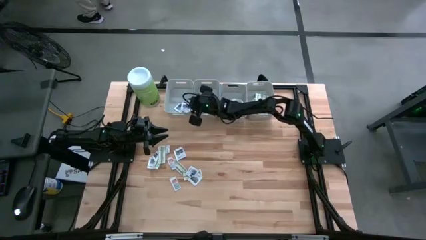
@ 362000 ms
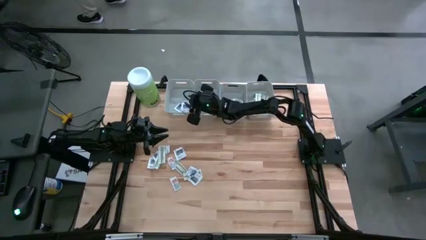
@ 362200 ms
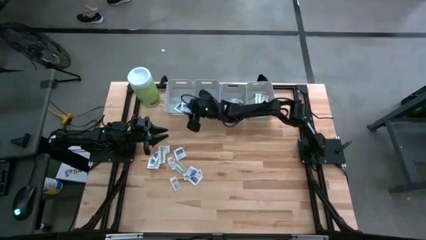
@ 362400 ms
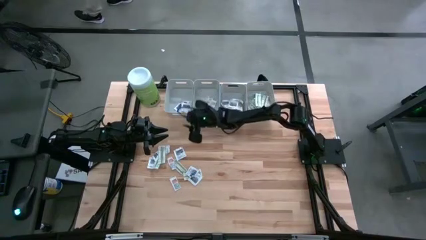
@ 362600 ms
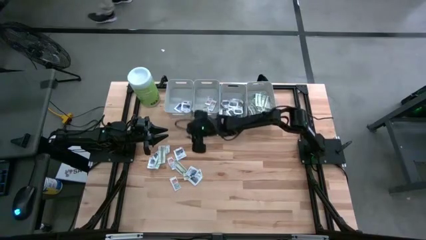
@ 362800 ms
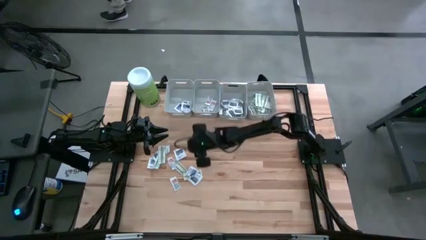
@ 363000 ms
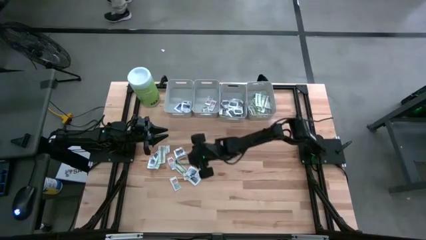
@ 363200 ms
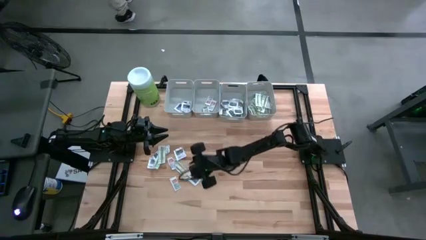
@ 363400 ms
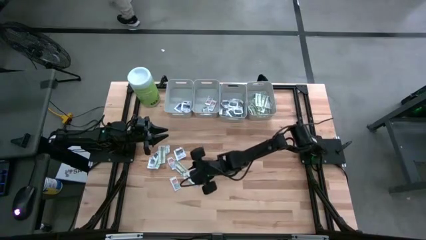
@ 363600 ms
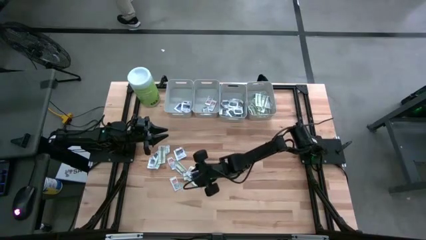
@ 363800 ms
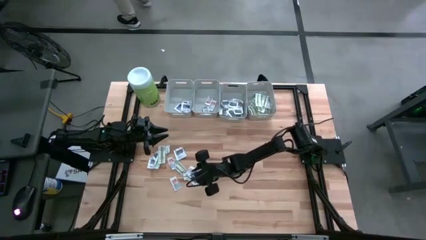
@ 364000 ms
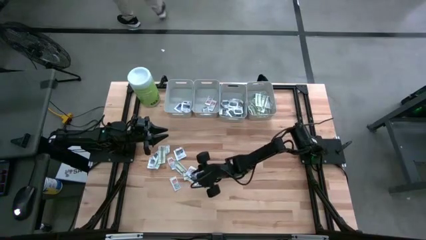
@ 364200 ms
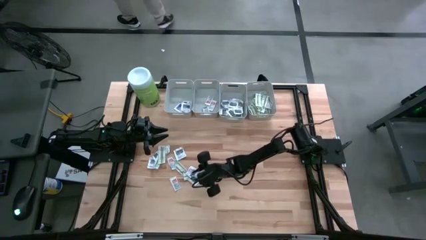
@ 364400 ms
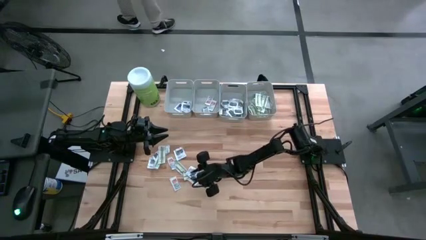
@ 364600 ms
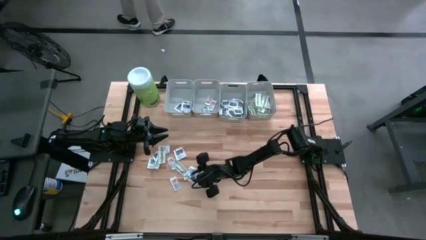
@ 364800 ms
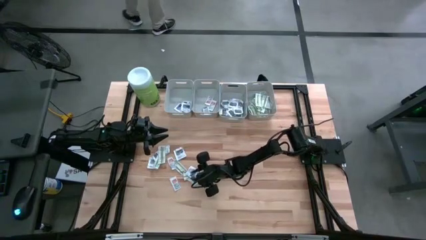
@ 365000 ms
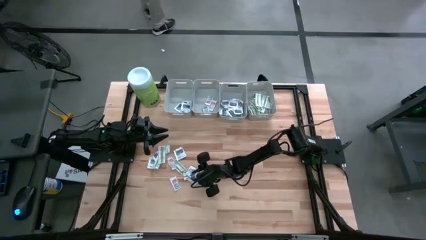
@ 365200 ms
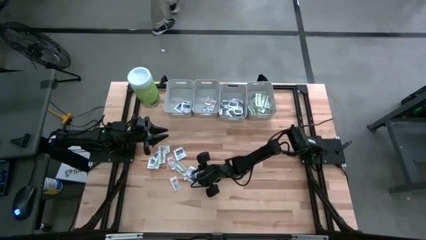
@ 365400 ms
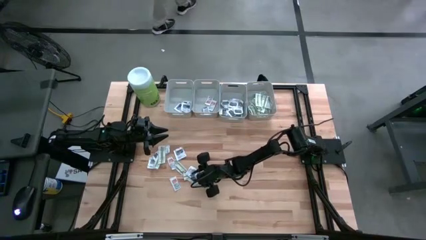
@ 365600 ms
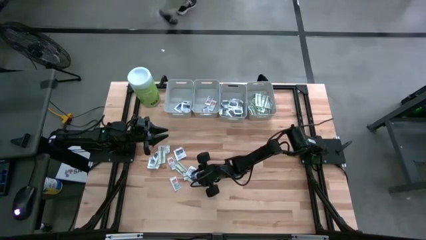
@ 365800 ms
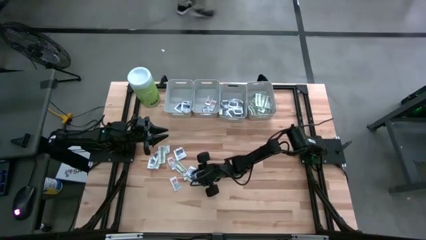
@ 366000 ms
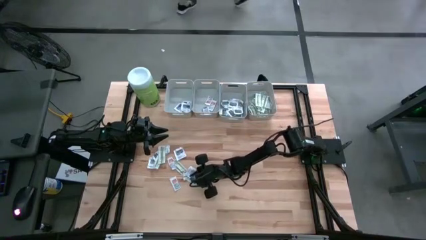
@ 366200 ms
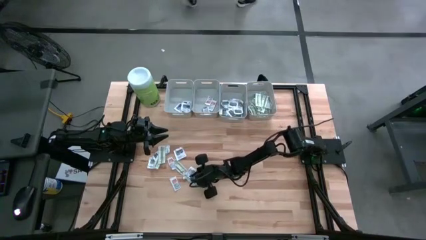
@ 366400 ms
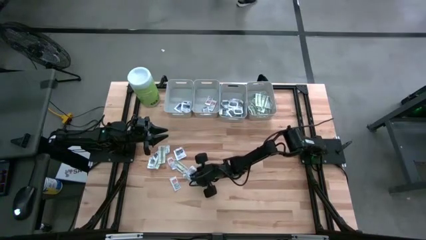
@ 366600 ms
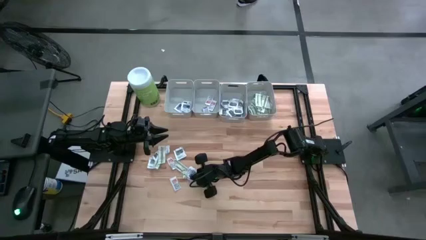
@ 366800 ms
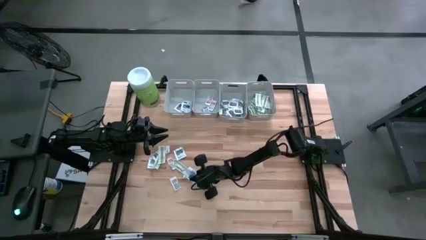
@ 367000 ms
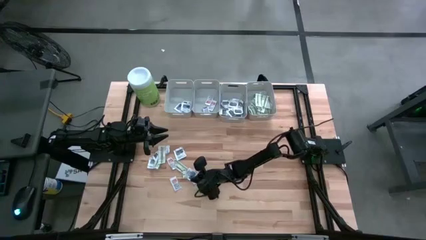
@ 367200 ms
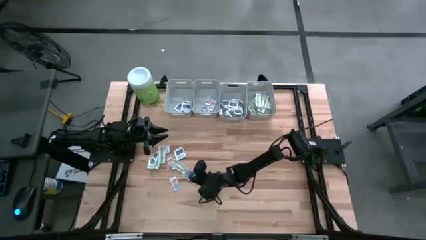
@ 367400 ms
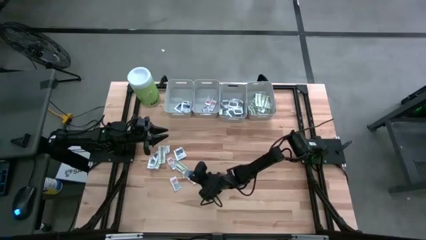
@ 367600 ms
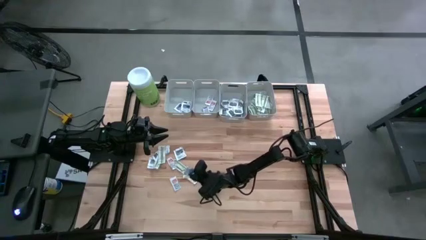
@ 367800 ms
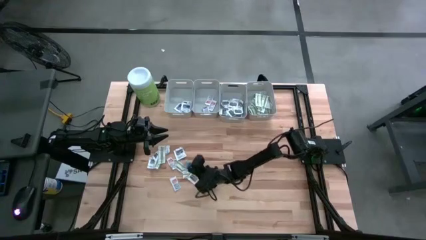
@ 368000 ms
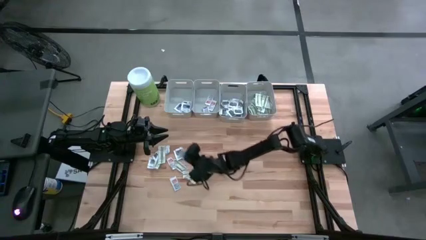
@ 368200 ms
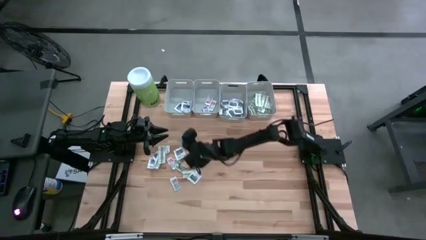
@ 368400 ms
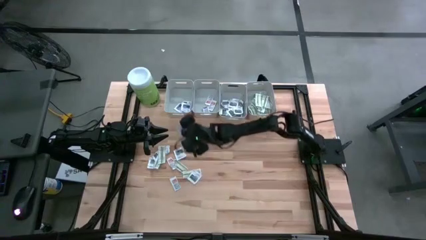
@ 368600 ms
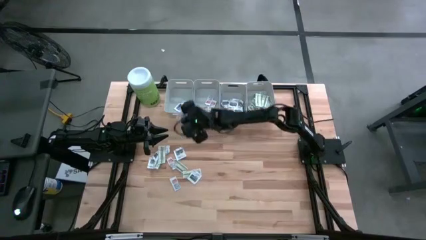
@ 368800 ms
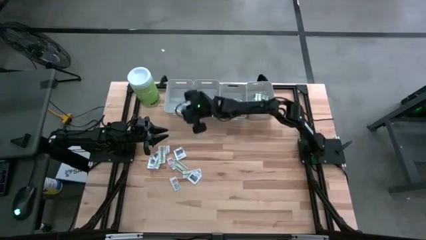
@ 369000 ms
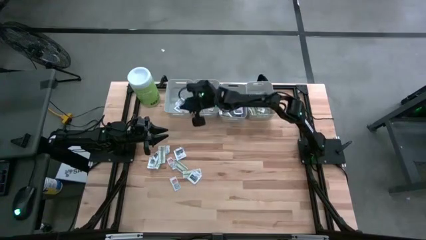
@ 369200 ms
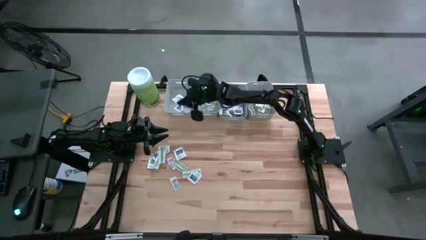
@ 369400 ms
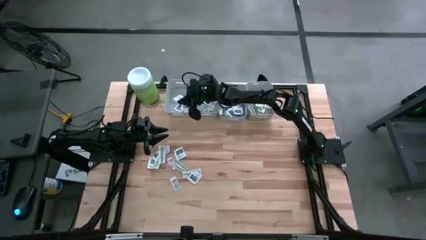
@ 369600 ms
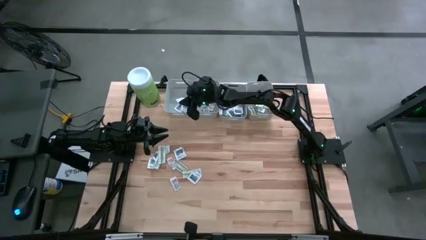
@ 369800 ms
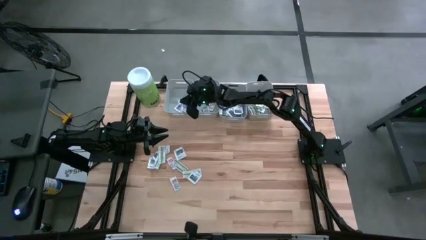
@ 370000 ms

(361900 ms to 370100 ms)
Task: Pick & Place First Aid Supplies
Put the alcohol pad into the left gray bin

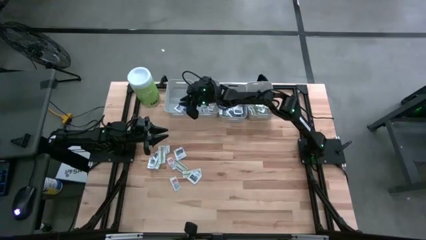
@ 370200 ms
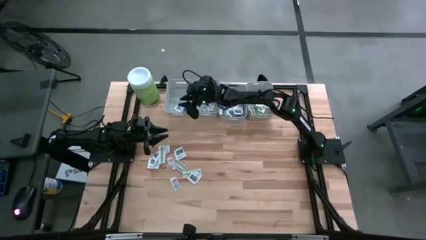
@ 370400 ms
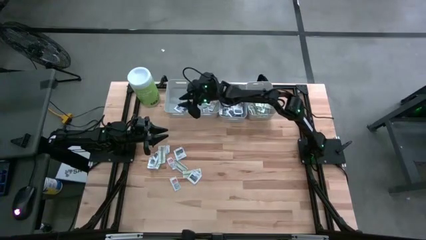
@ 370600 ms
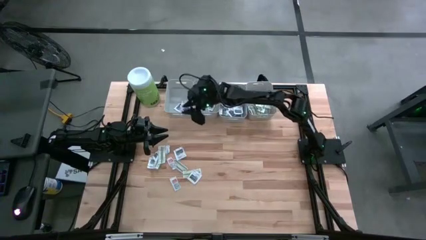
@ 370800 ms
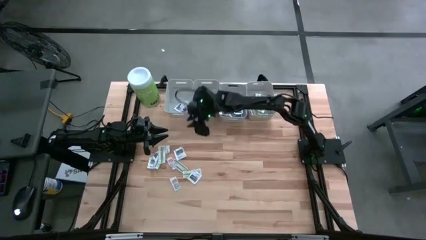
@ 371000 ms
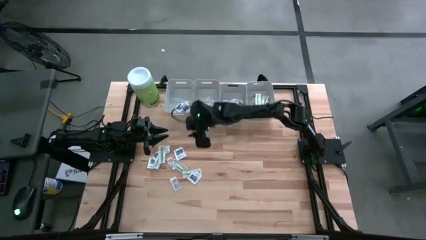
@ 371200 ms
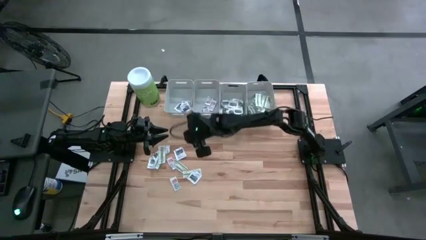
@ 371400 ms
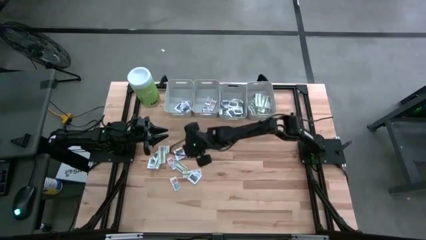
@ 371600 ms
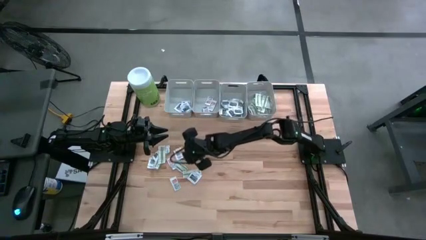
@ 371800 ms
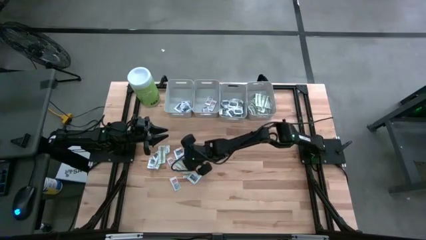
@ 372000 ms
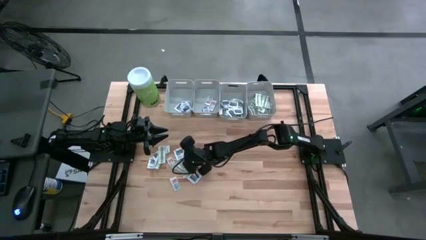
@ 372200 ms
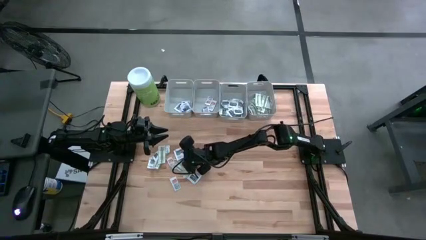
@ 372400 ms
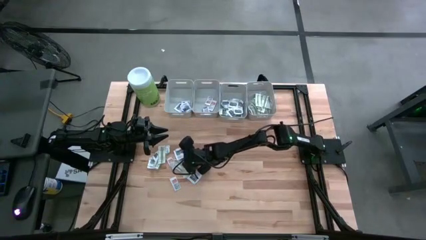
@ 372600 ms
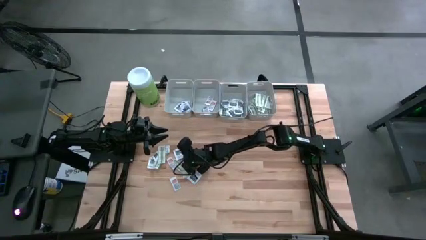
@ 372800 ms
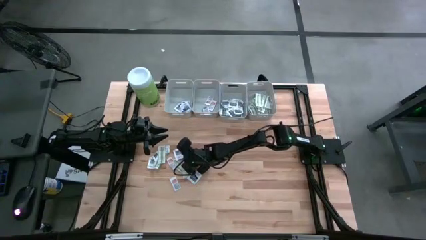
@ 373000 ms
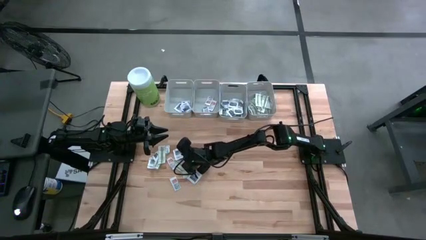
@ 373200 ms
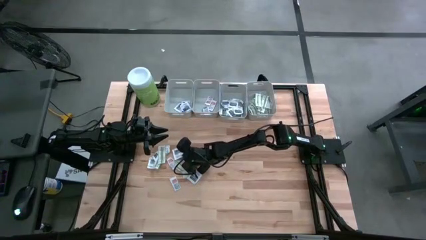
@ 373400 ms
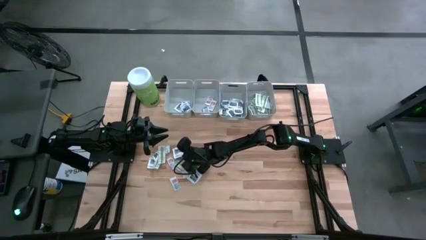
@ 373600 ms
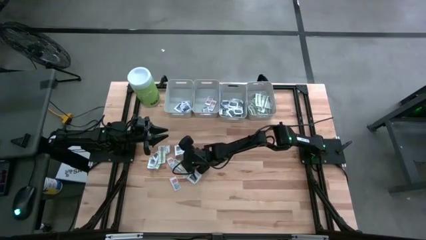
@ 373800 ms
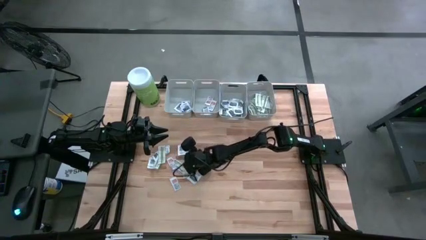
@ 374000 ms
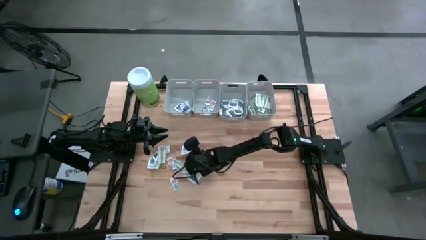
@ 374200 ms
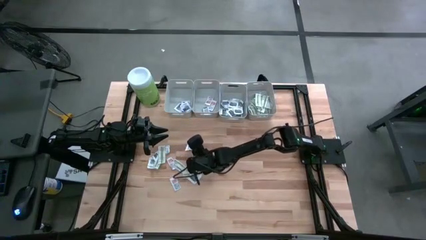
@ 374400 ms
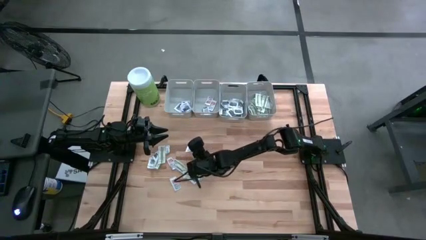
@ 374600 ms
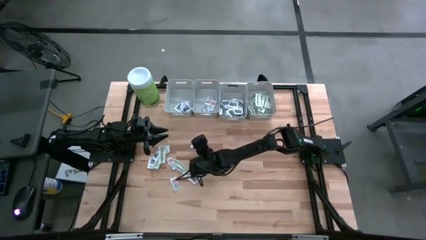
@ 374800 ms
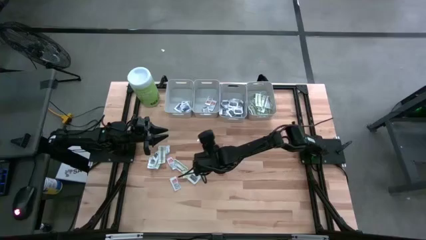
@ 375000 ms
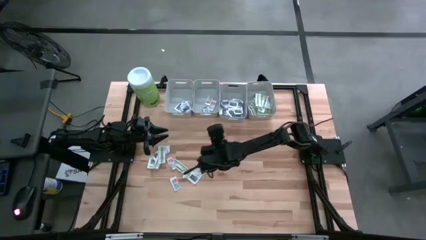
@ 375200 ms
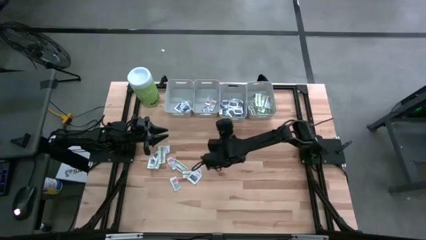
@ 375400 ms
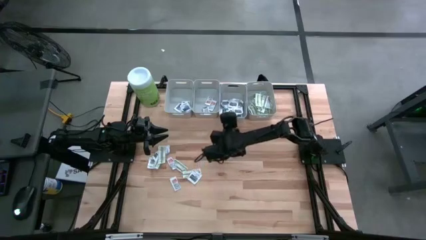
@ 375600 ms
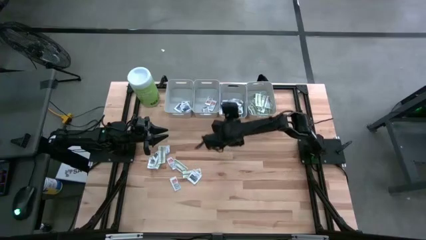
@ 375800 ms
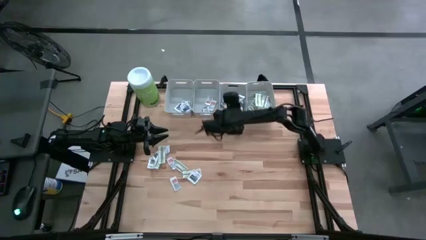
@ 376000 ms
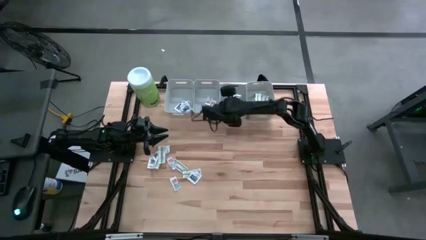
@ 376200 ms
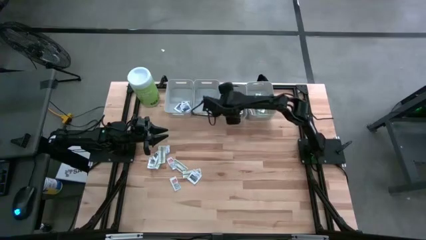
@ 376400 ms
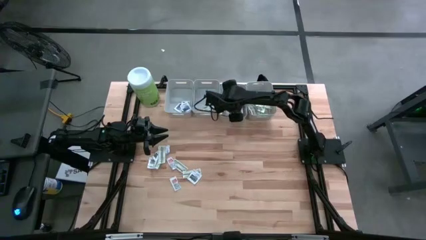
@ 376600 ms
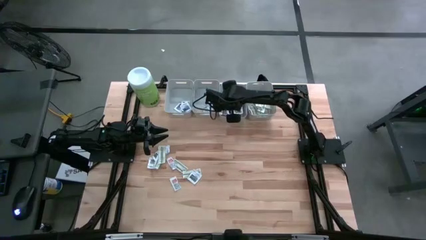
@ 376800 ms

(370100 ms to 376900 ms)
Put the towelette pack into the middle right gray bin

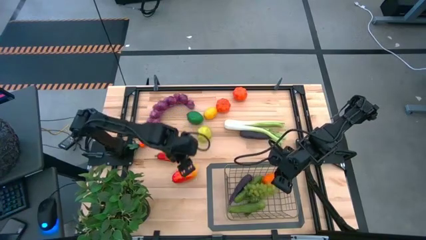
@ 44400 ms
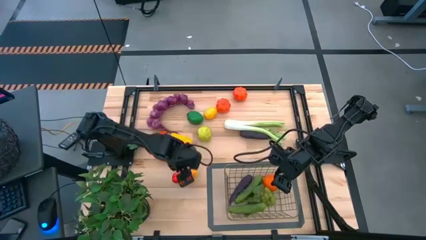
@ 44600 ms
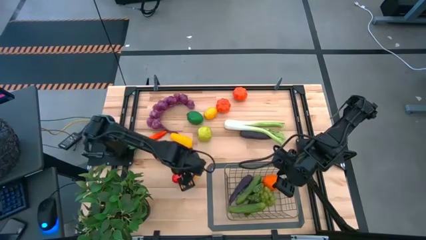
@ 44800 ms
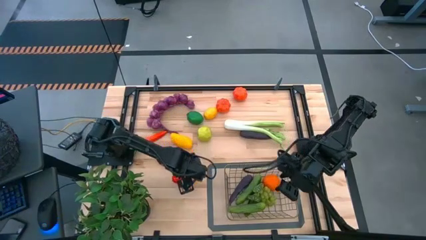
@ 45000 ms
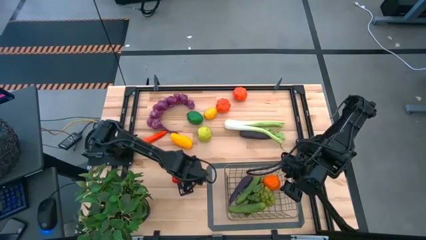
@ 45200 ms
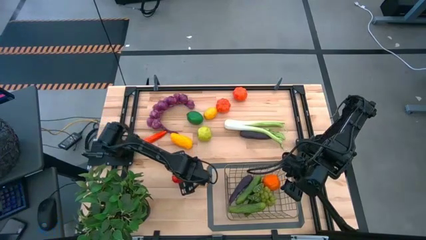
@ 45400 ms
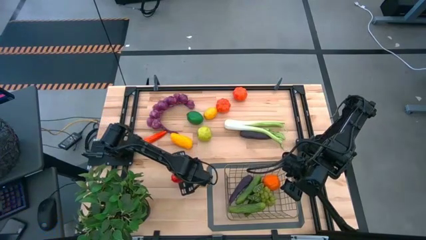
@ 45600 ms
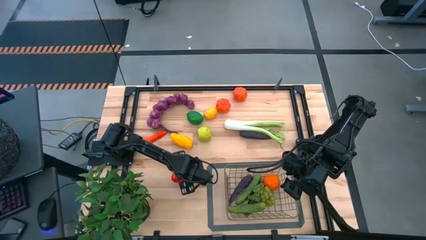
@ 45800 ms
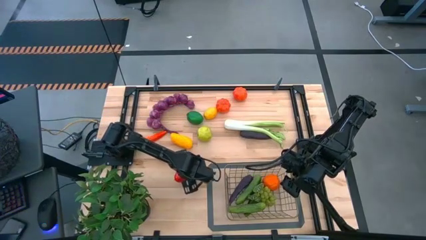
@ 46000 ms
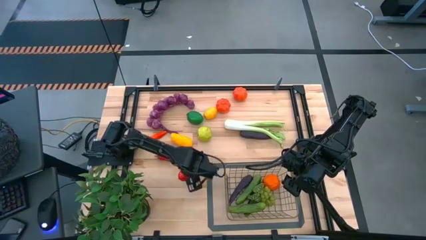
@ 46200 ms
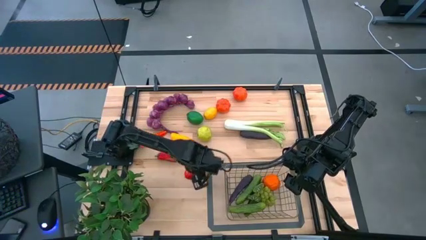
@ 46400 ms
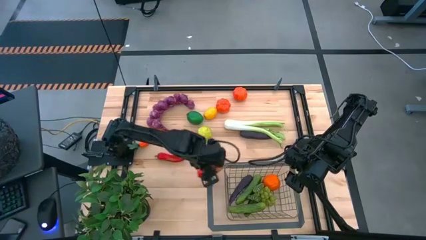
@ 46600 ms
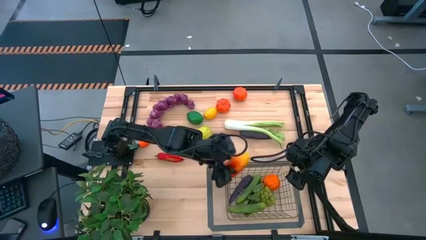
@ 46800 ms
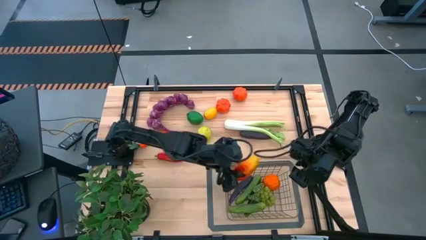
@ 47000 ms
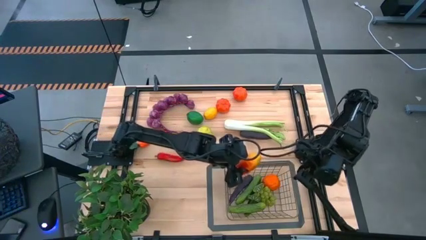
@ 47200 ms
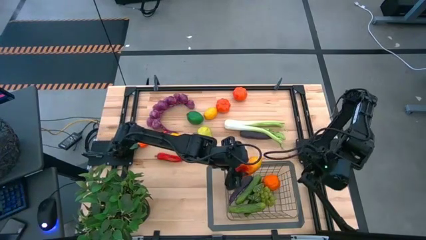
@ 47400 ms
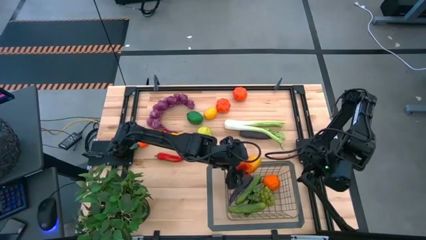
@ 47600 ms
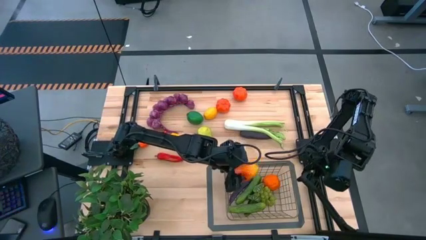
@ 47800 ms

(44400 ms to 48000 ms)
Task: Build produce basket
Put the orange mango into the wire basket
